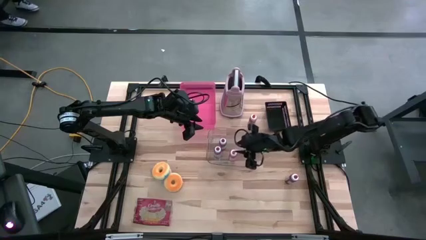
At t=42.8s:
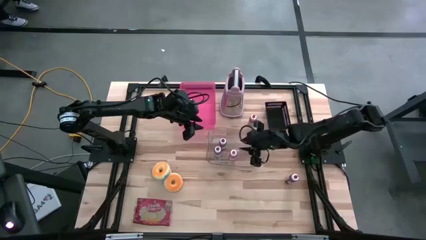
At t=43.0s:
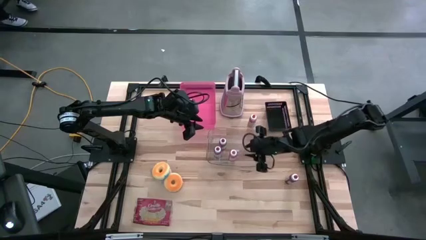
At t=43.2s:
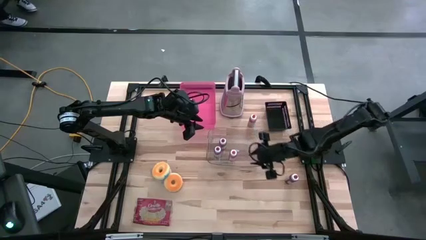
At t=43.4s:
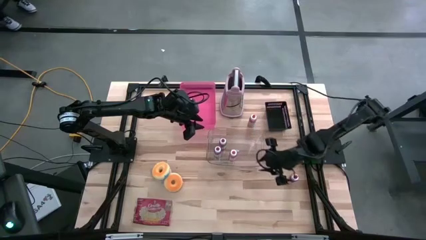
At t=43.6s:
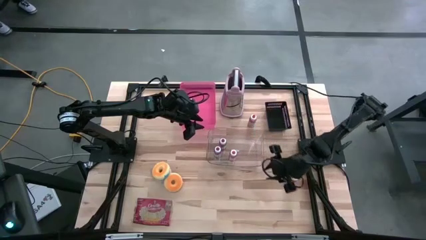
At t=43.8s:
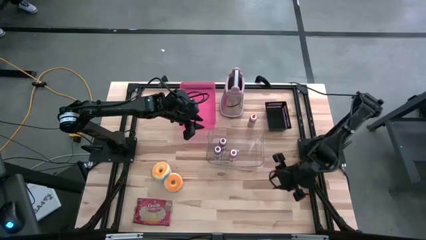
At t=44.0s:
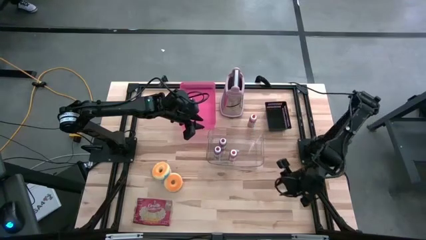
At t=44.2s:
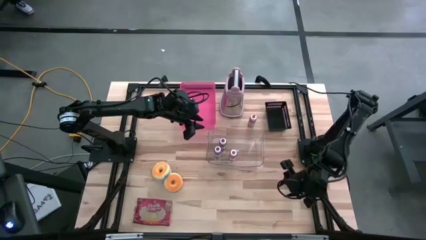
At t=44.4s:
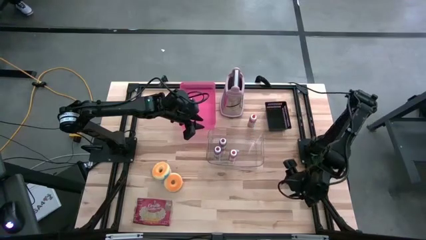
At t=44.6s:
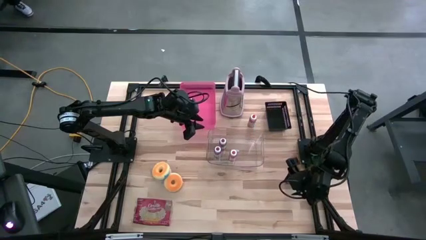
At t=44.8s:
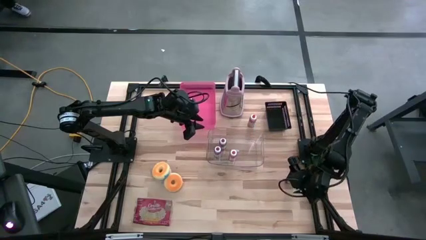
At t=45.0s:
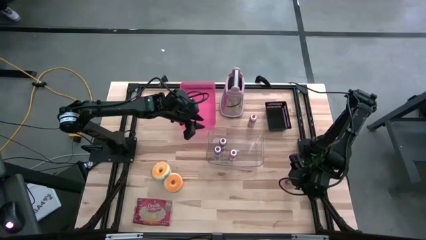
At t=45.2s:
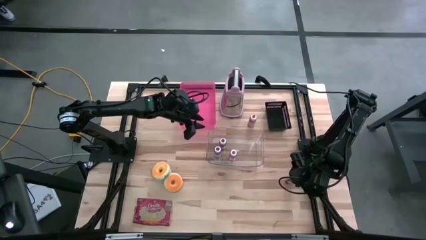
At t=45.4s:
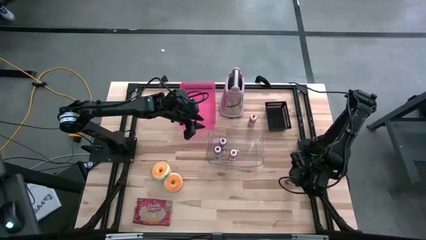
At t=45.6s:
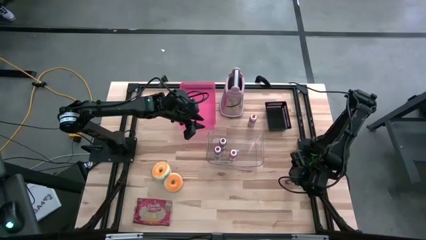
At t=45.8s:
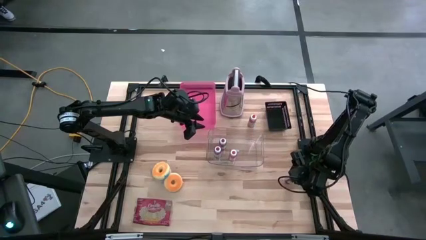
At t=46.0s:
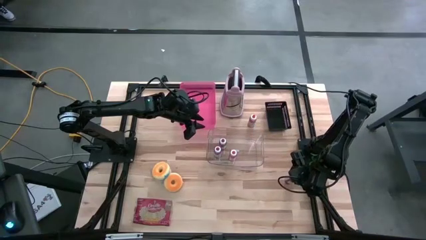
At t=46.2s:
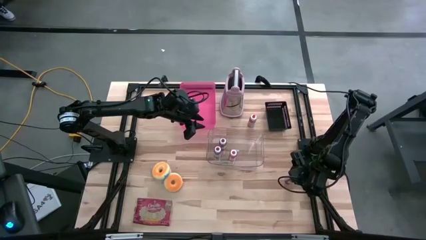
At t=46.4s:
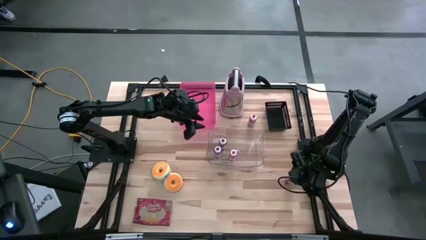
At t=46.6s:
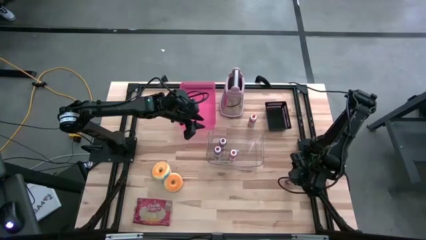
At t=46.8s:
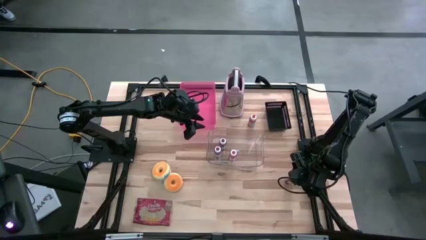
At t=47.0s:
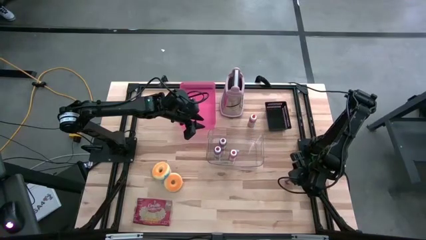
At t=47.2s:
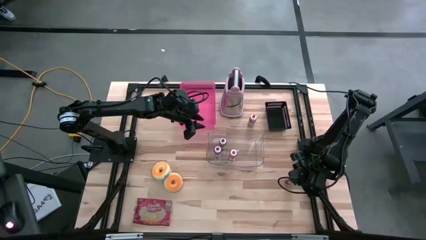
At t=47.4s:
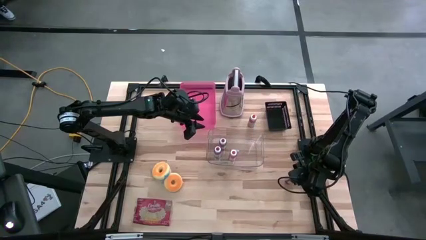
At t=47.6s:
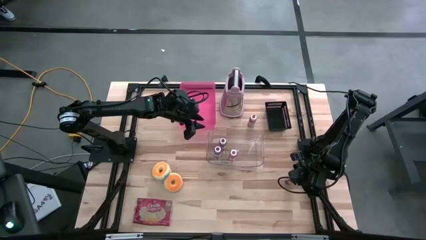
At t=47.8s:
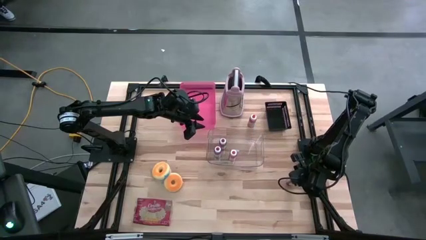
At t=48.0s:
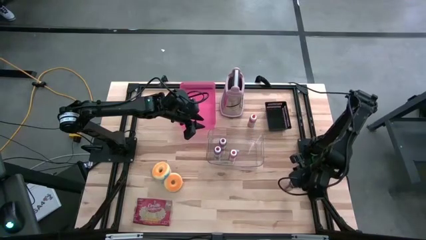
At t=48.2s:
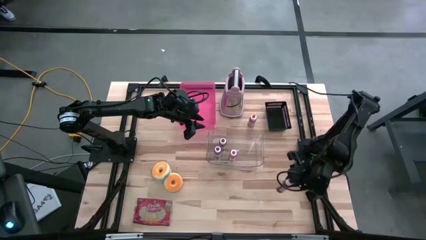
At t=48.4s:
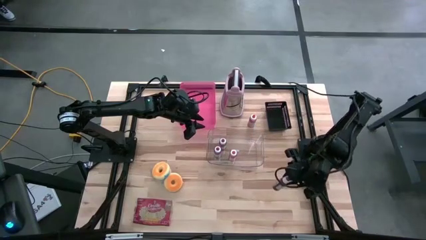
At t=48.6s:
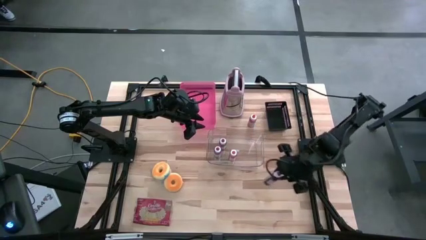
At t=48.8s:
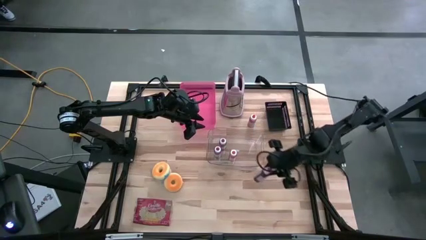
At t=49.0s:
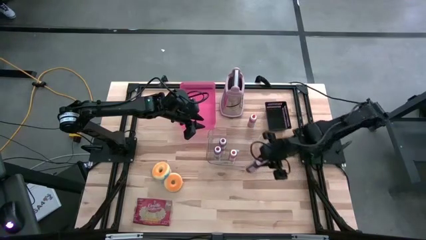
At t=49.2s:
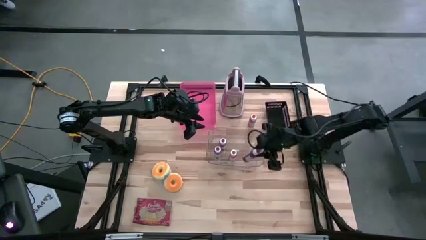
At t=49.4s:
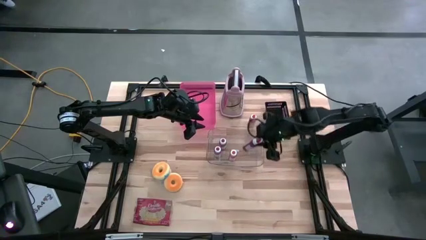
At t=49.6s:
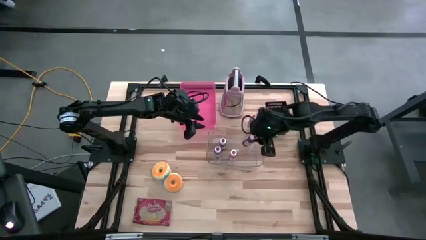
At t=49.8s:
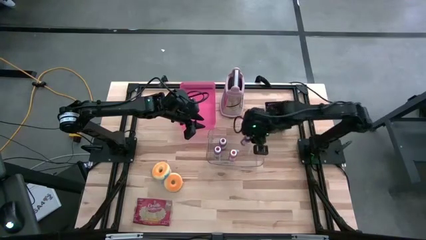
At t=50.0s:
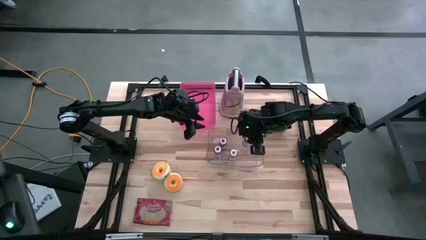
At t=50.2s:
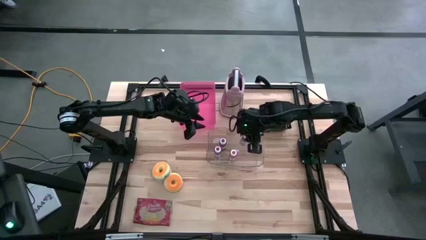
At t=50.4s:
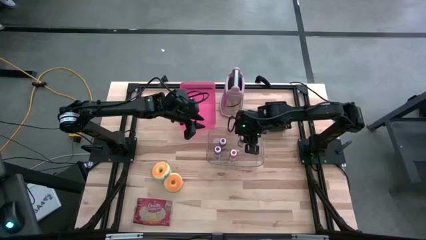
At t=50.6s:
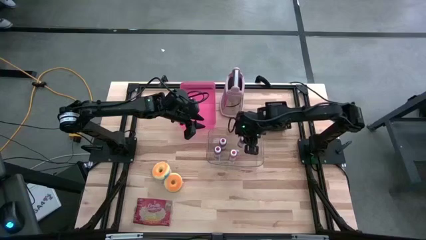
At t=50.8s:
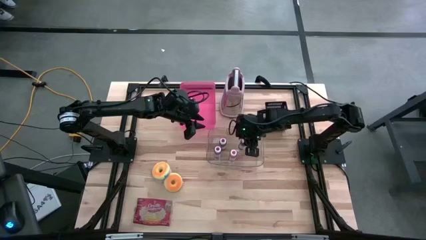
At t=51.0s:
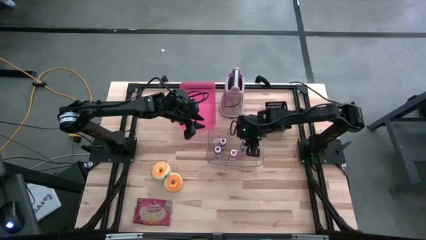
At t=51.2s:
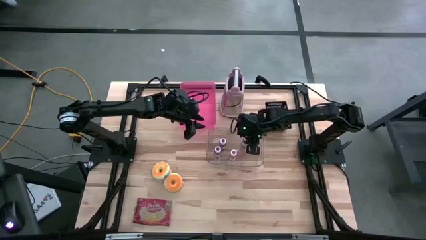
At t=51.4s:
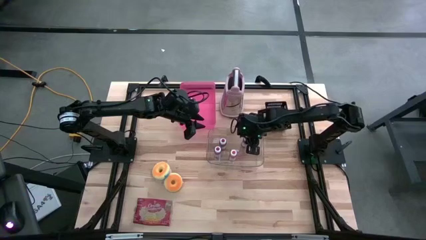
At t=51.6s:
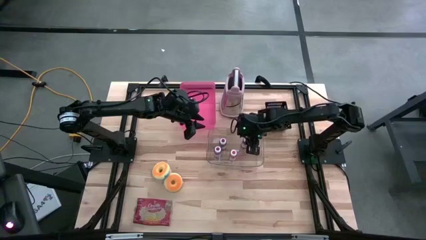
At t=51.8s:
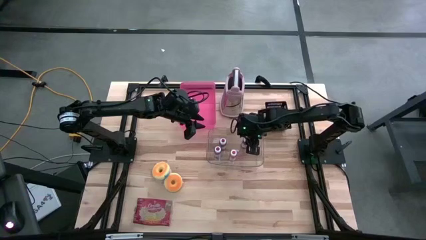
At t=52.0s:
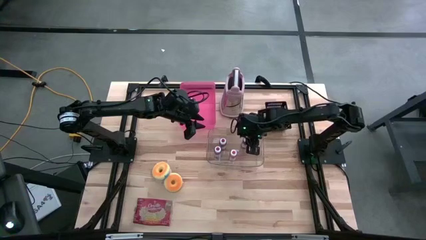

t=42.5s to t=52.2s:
Put the red food coloring bottle into the transparent bin

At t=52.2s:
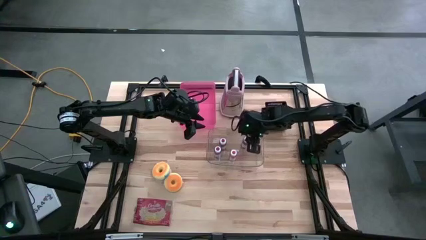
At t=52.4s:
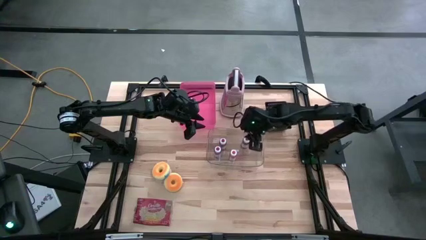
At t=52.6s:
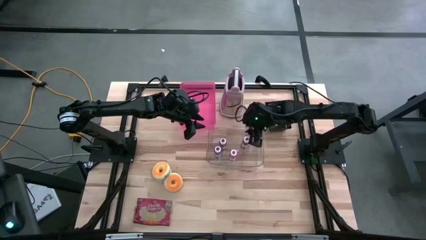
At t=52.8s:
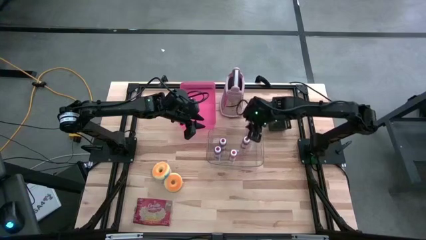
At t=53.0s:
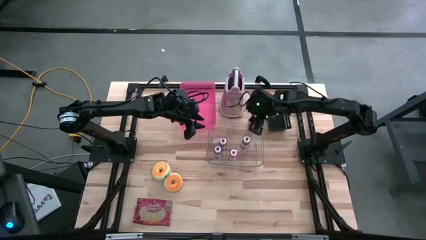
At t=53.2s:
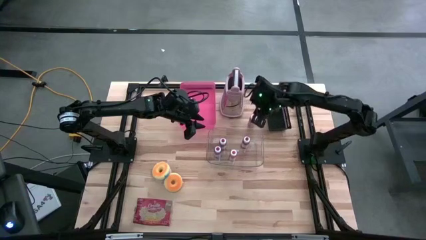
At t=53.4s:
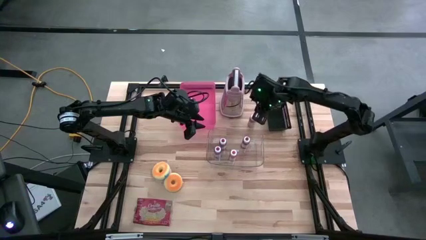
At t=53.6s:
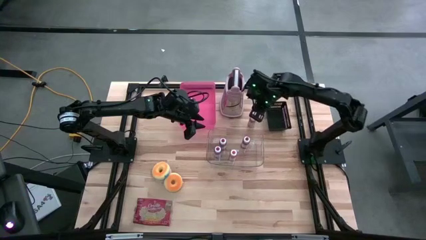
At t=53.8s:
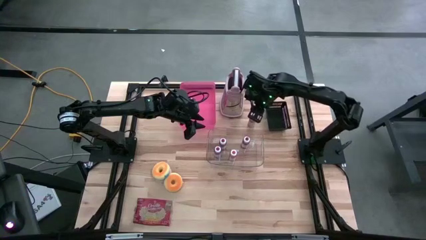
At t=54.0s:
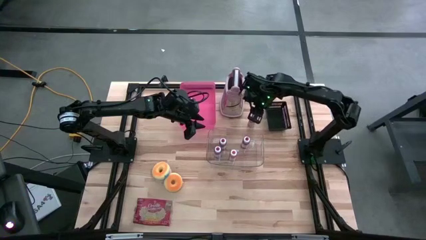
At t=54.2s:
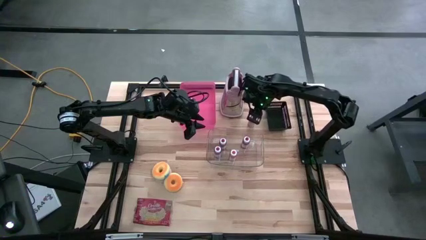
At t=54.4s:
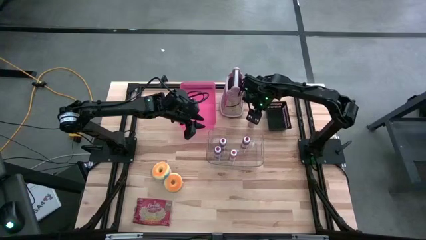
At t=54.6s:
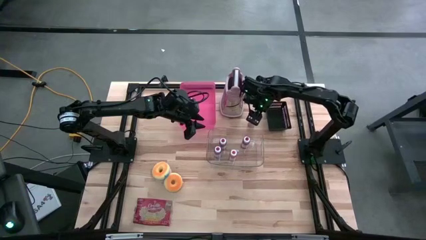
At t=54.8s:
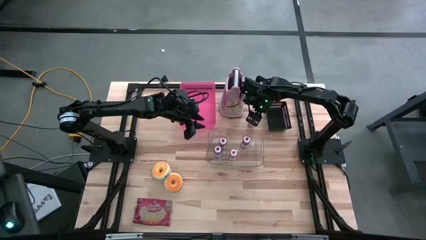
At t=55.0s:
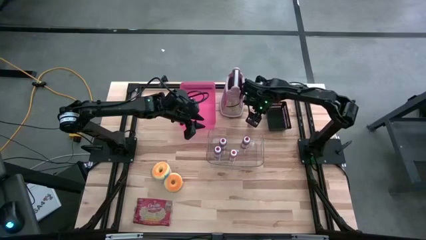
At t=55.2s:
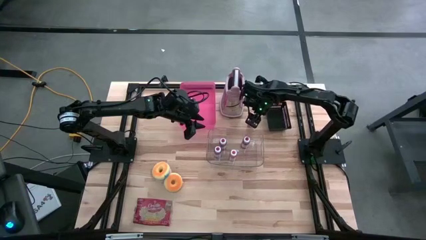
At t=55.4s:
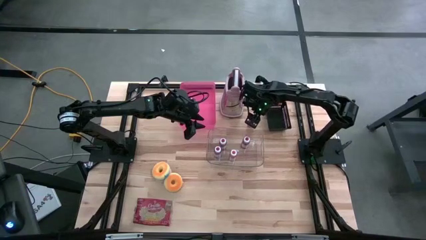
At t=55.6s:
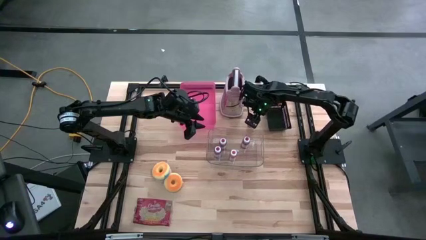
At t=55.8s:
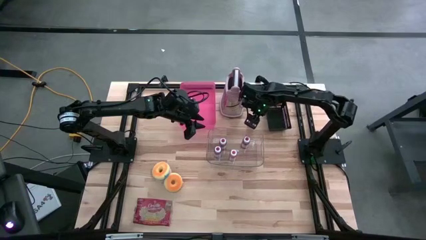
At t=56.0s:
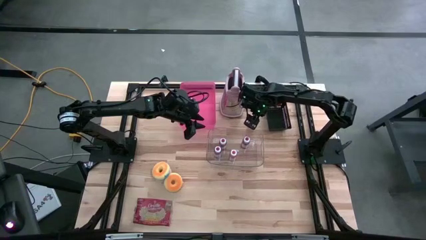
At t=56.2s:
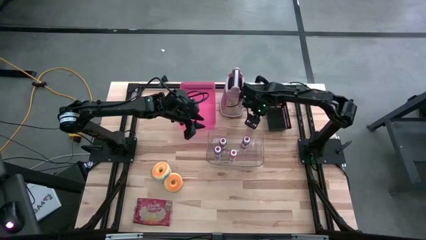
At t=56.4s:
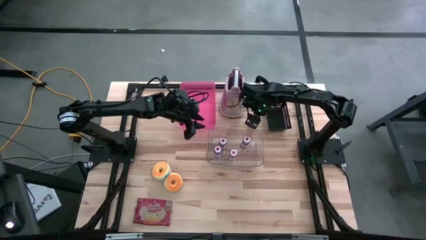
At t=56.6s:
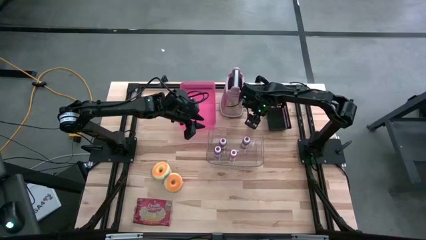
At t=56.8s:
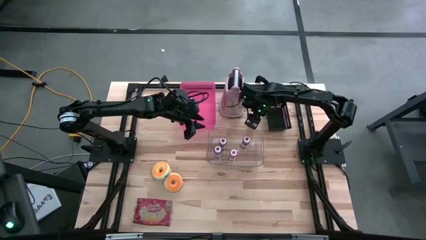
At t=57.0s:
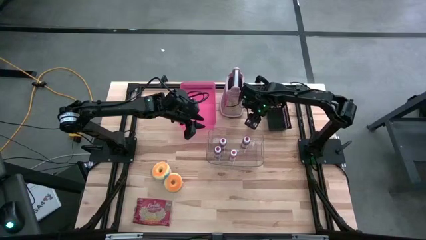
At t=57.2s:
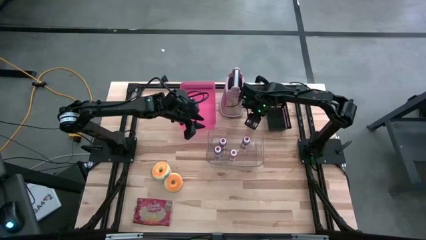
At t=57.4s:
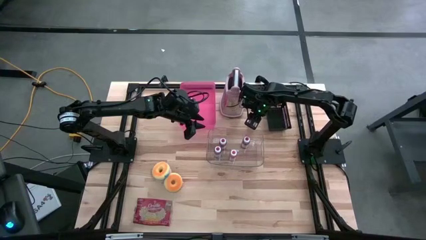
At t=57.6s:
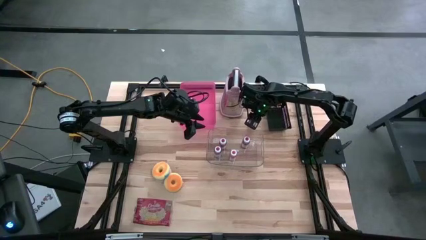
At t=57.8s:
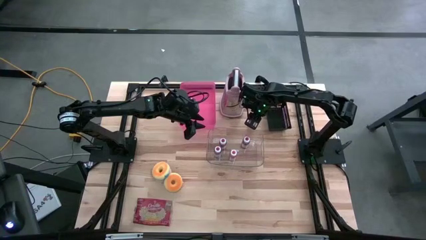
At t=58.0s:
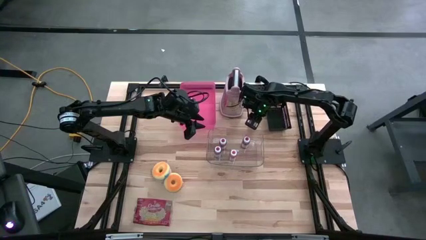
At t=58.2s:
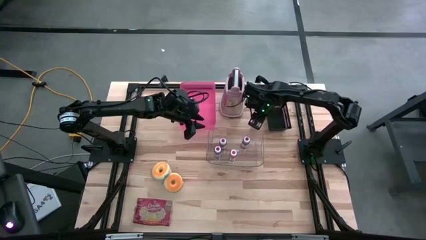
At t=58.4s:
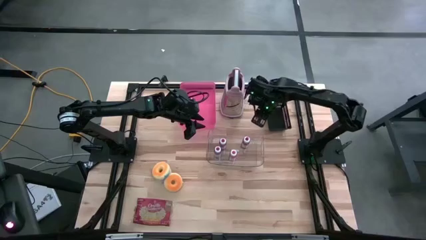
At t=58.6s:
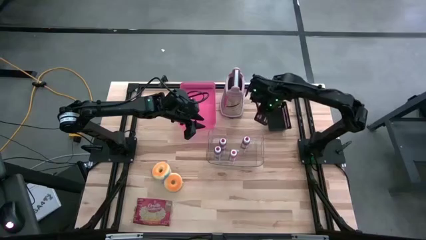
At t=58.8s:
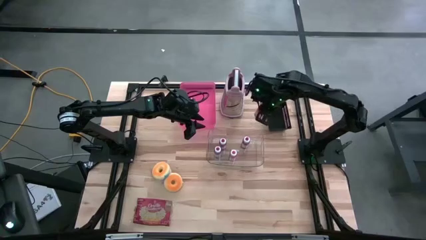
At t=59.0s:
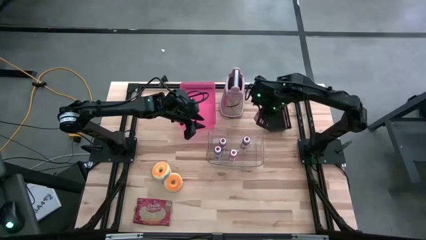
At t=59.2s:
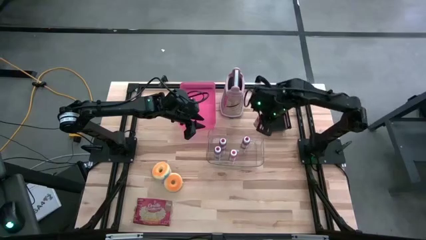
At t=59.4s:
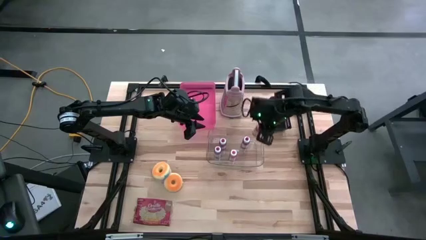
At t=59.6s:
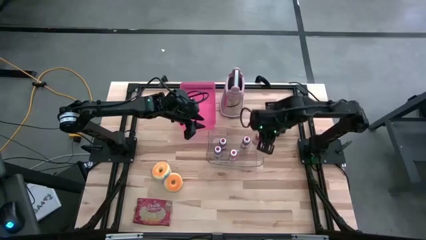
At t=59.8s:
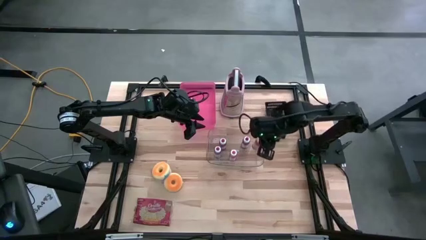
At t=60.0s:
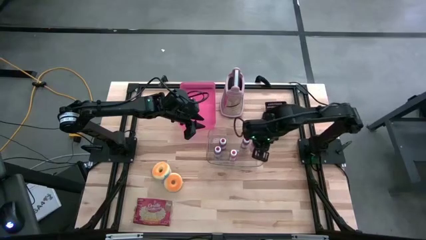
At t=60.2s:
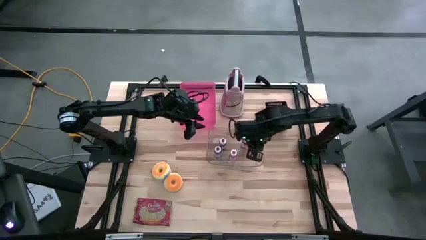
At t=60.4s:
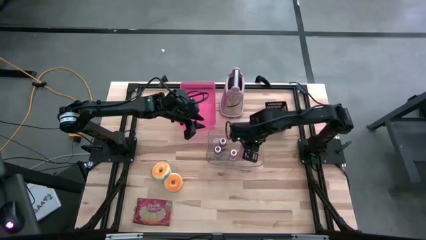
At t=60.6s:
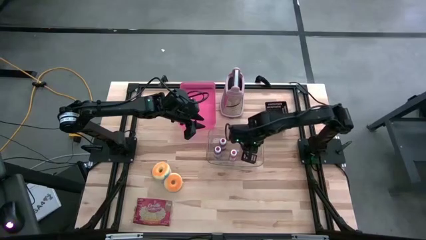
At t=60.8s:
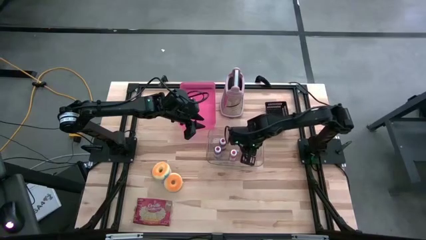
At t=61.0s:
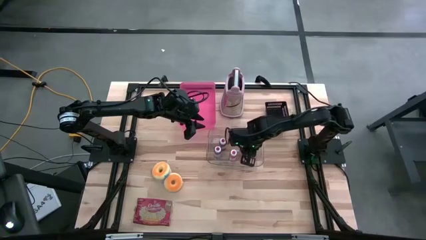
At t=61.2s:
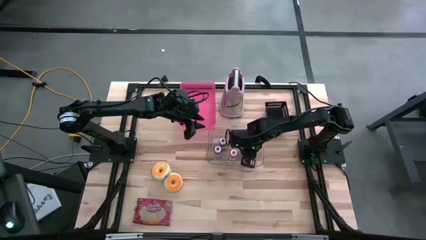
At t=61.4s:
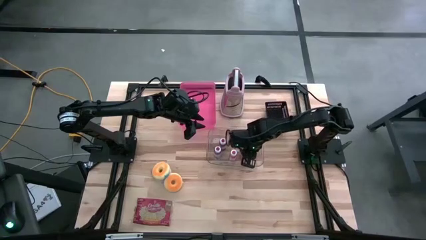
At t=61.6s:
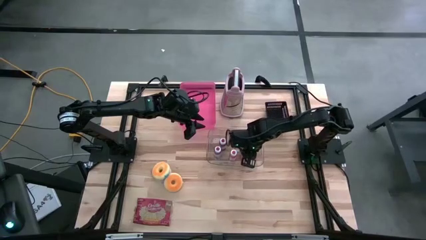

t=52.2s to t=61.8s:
Put the orange food coloring bottle into the transparent bin
